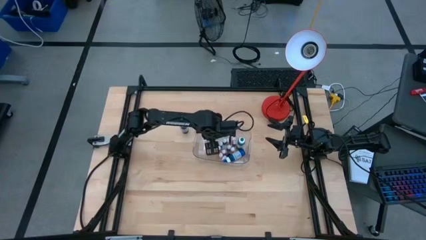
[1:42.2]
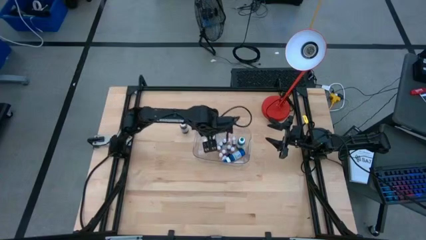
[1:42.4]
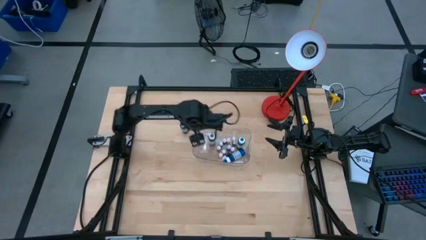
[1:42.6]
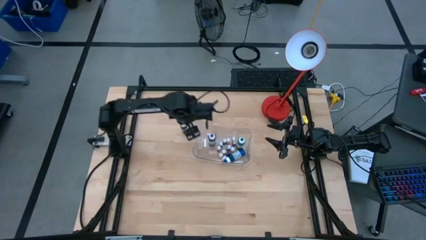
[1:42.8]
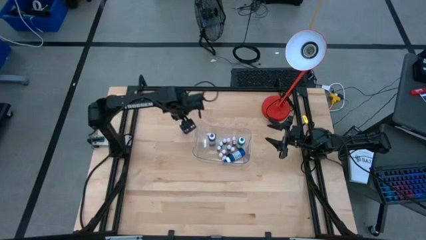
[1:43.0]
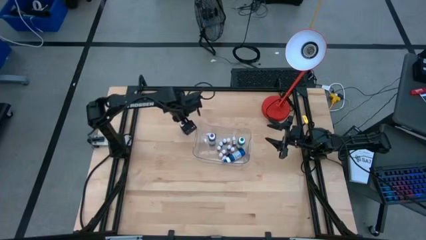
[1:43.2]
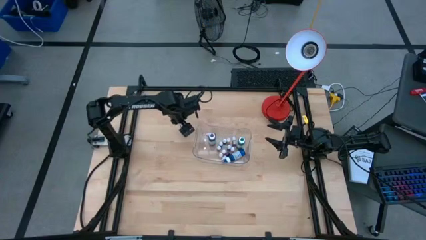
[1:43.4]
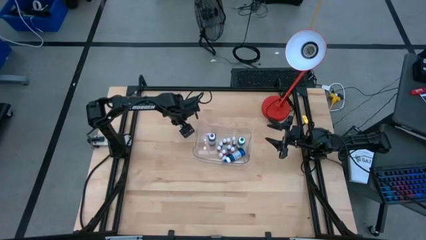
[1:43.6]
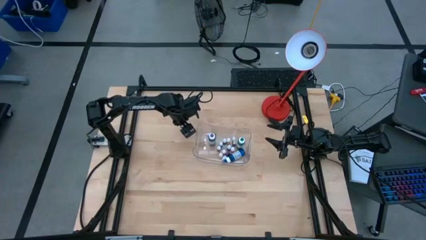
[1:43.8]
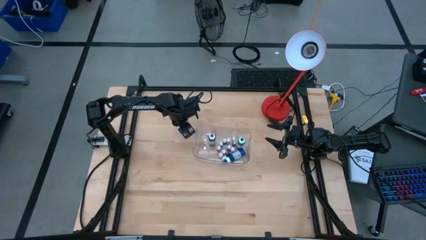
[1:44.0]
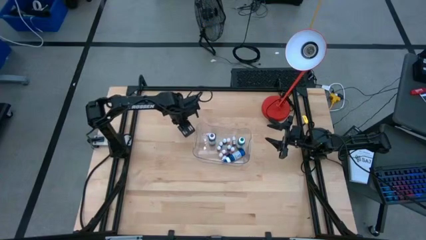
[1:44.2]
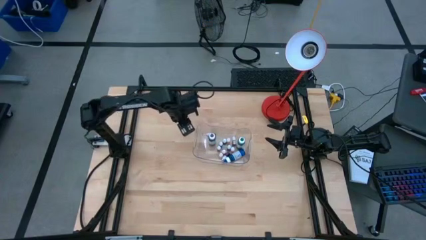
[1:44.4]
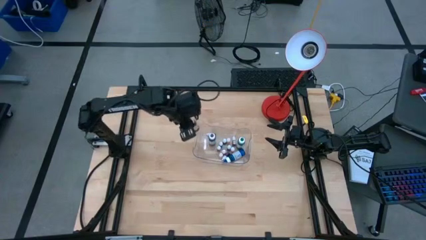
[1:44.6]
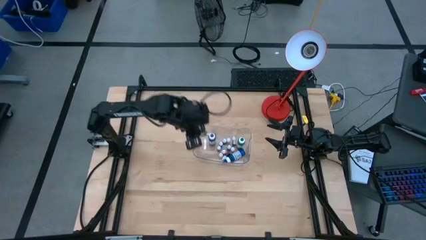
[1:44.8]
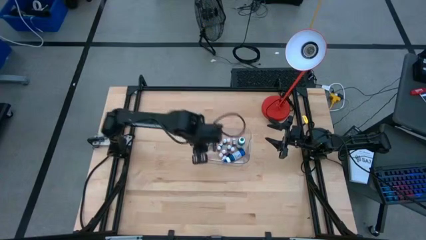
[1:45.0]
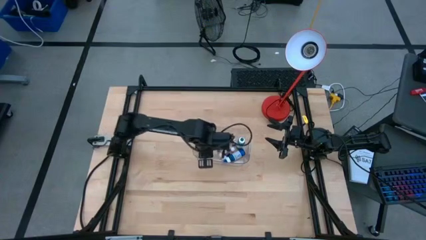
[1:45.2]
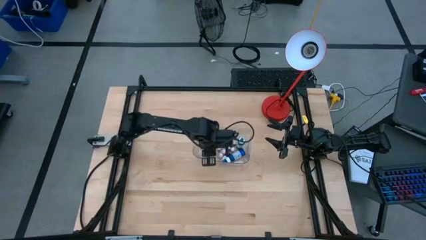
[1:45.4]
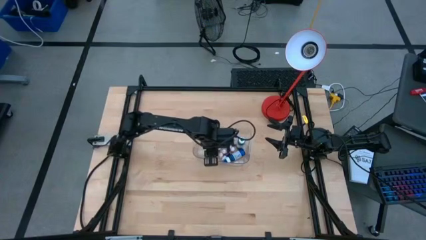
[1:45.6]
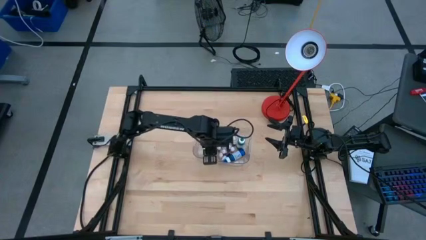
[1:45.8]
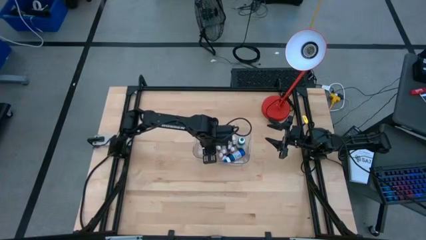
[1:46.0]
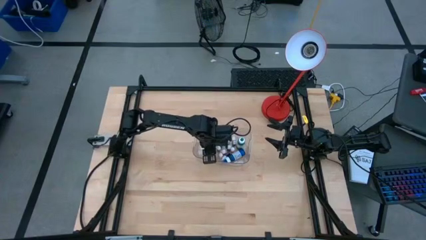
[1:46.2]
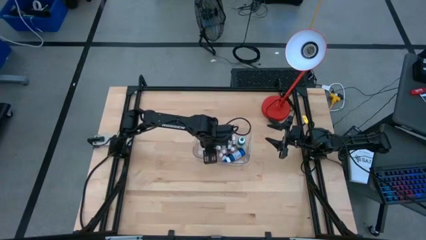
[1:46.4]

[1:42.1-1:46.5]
Task: Pick & Place food coloring
Put the large black food coloring bottle into the transparent bin

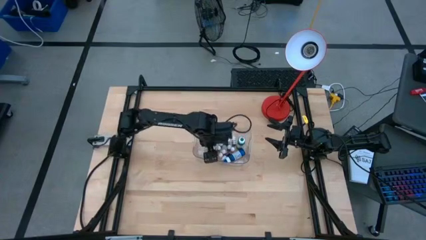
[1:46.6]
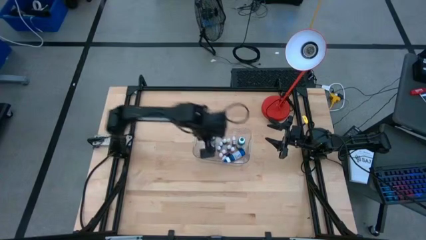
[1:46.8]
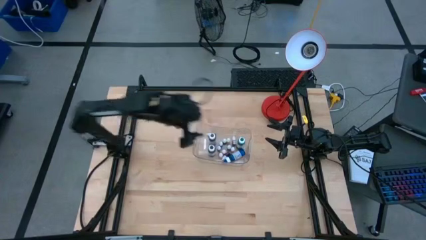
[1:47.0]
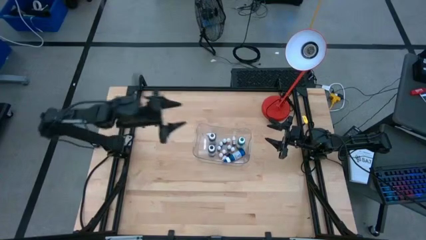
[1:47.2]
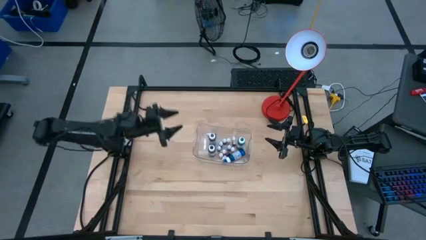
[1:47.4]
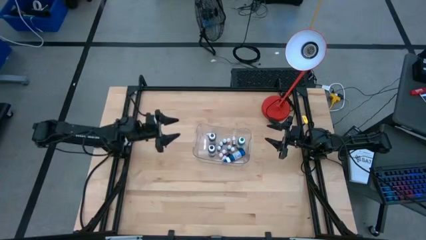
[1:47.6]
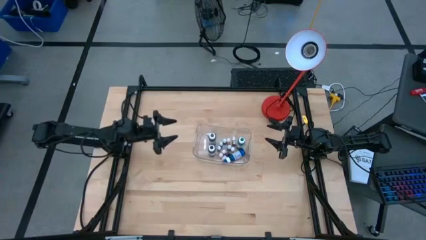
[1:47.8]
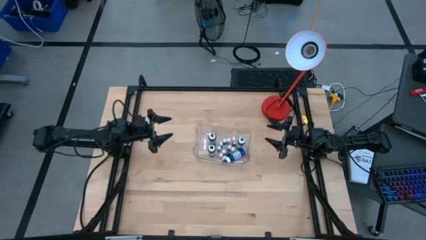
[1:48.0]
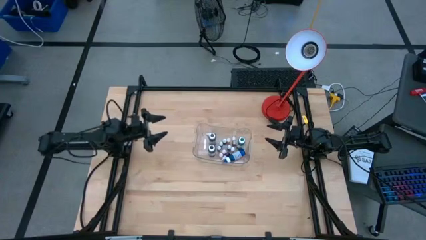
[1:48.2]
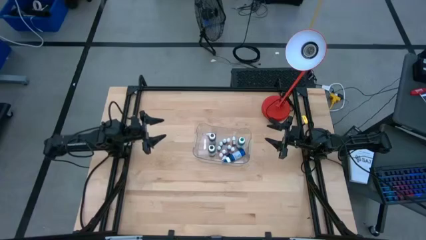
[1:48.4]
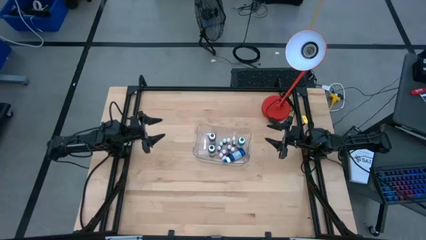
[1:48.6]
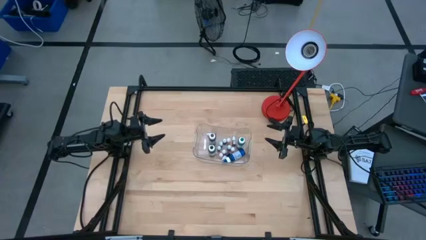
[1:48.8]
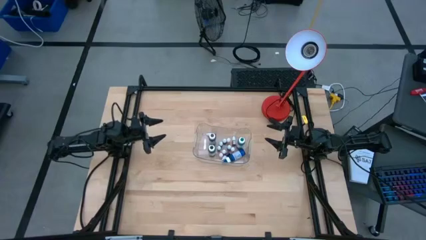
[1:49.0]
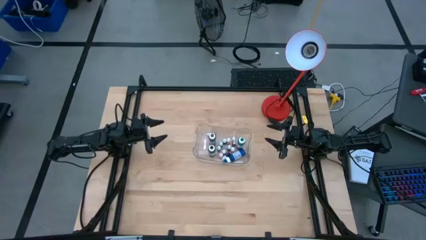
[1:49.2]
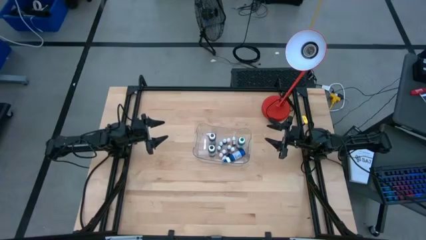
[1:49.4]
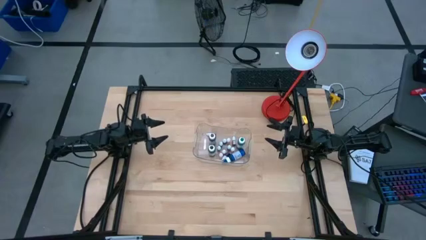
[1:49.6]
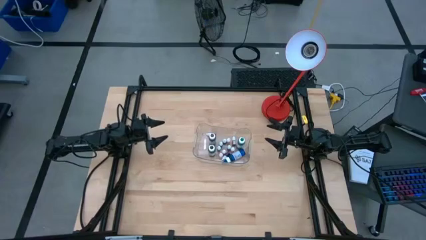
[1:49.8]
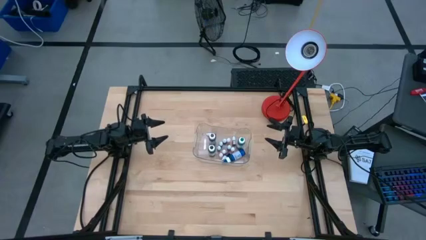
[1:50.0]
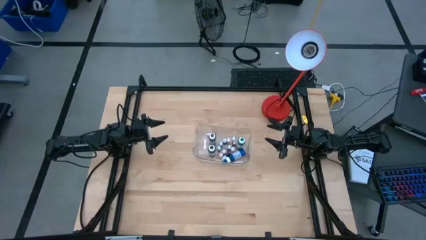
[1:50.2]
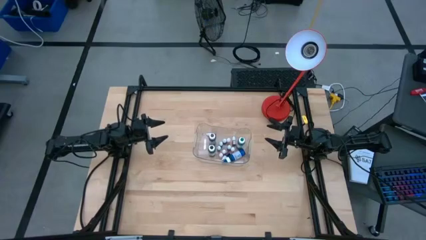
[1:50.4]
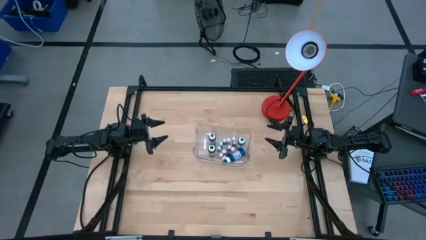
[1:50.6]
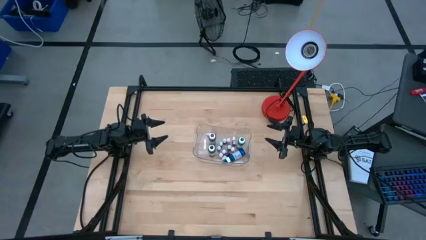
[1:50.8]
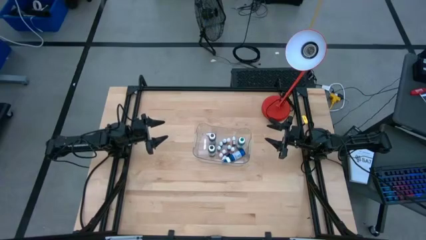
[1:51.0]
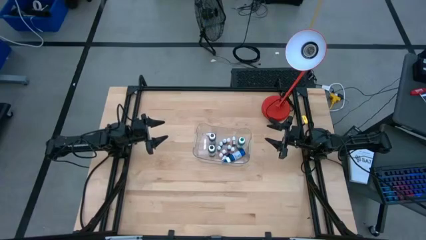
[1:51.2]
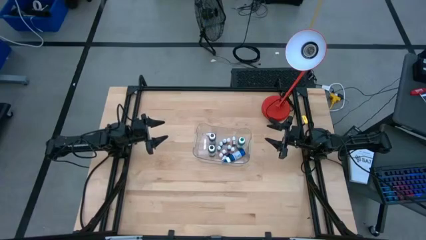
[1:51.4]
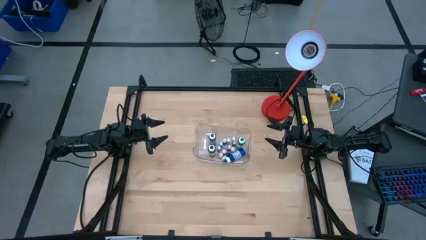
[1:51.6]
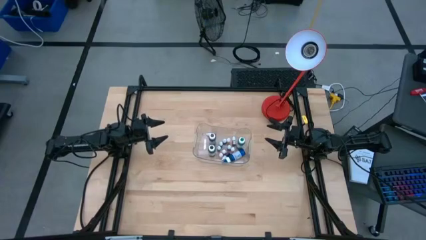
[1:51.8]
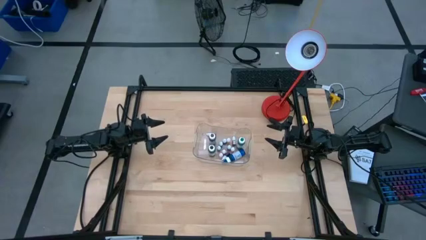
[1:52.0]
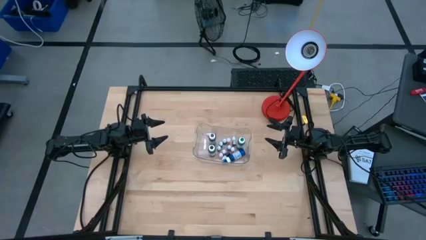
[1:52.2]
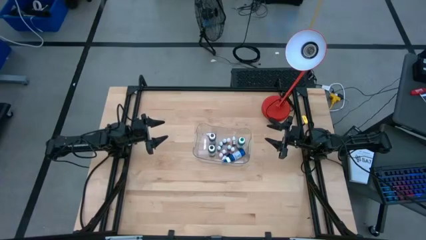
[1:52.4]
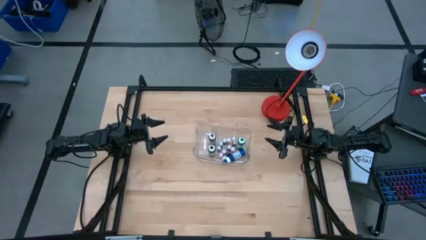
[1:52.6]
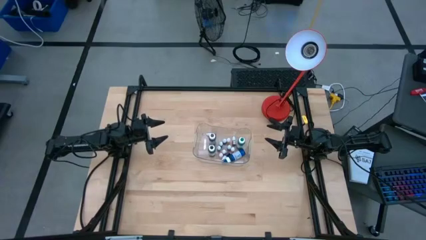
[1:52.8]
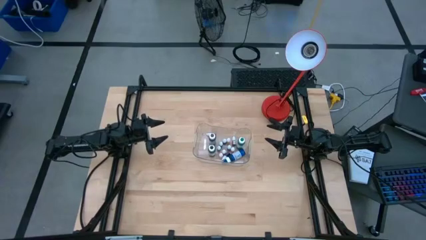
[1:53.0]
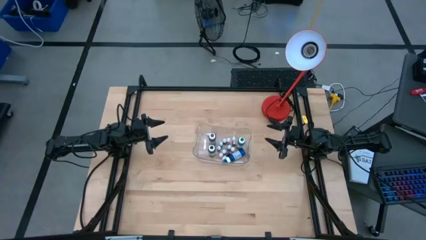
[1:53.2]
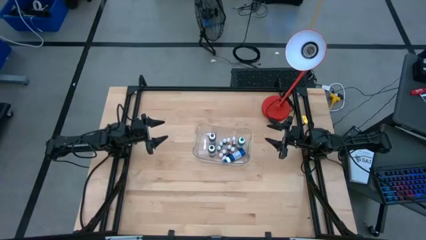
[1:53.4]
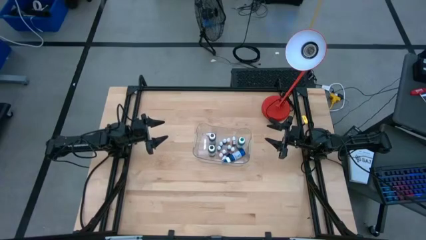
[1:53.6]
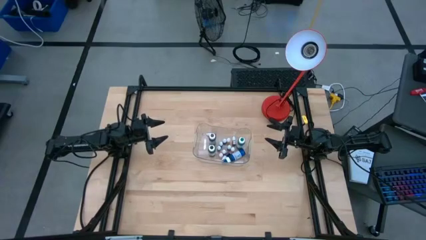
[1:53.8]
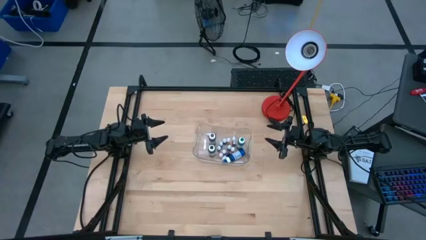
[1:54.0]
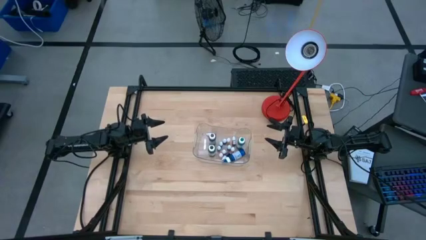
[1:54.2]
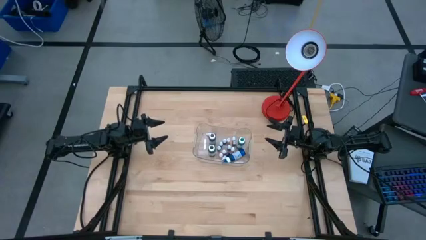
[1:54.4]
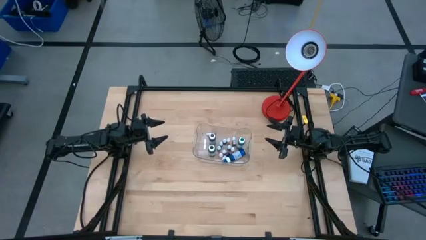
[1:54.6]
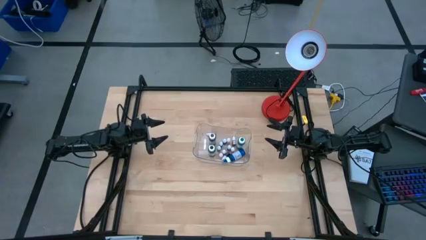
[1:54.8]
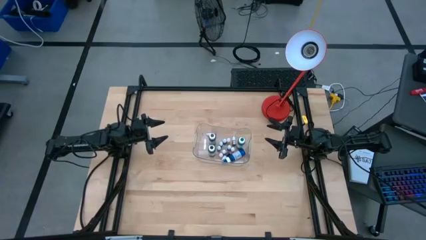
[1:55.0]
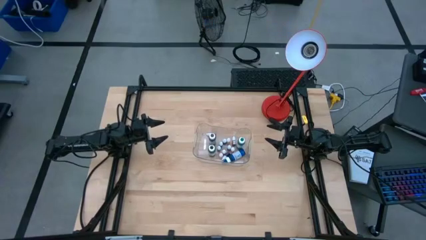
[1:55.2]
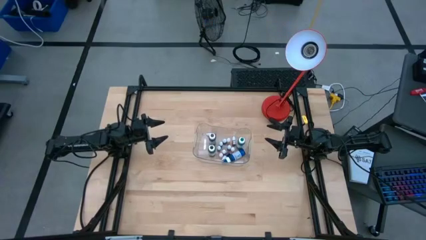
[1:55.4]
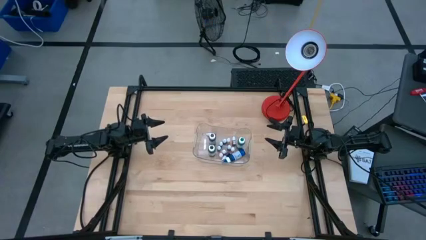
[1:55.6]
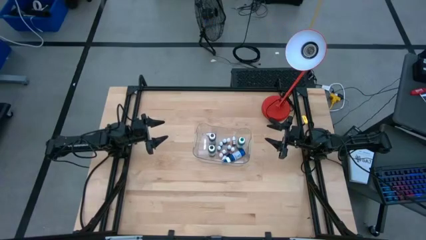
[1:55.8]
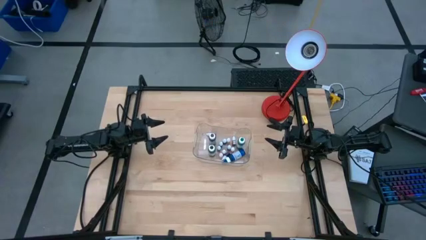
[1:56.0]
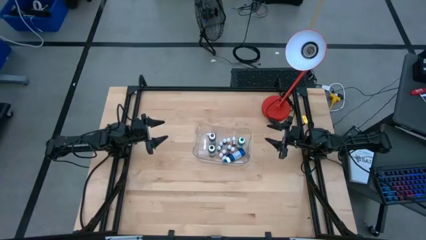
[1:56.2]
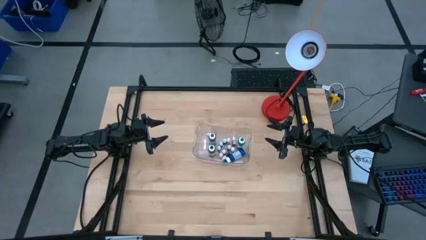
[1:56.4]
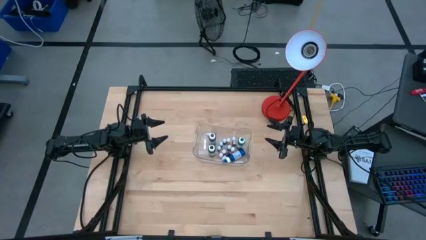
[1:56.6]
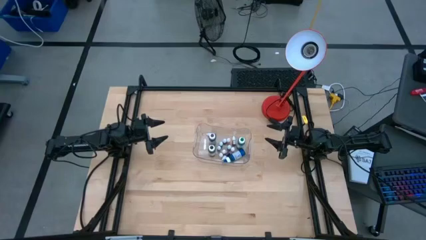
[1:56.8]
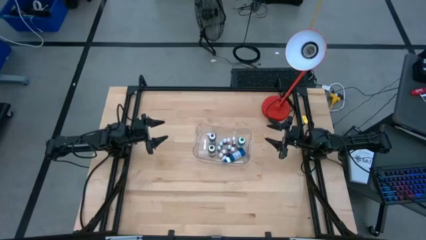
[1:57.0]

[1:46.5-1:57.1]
Return to Home Position

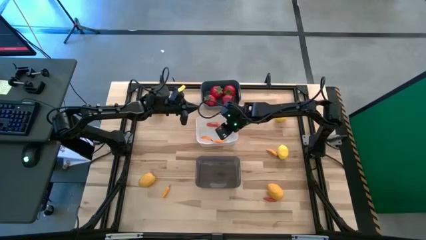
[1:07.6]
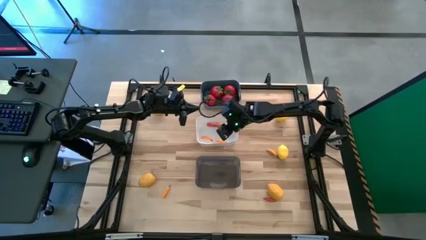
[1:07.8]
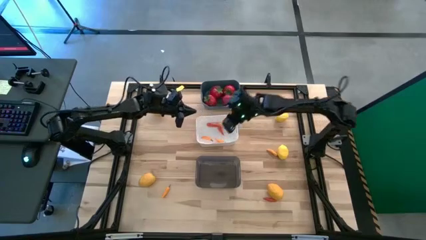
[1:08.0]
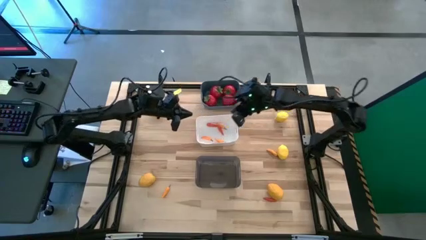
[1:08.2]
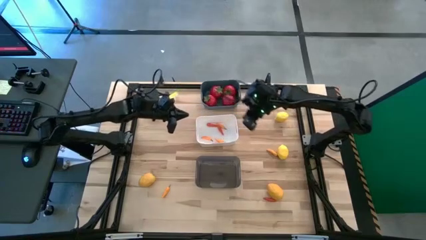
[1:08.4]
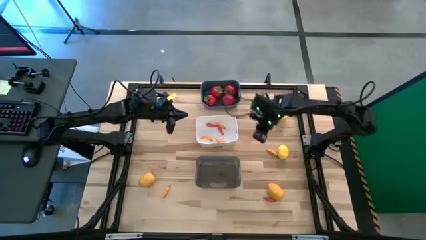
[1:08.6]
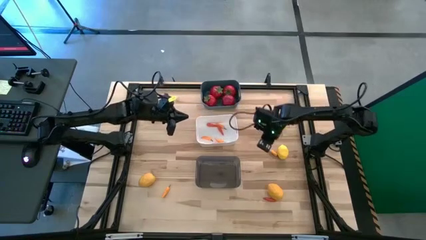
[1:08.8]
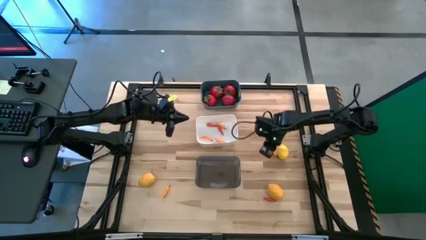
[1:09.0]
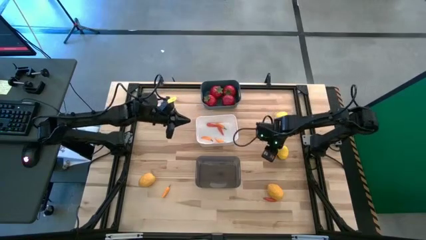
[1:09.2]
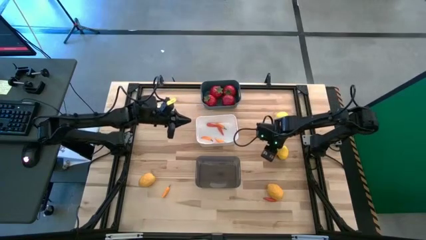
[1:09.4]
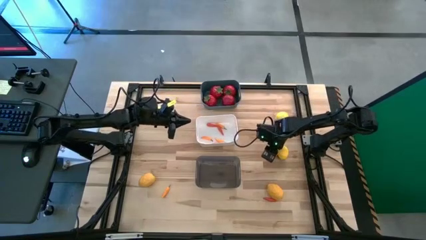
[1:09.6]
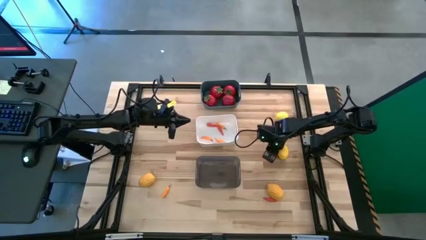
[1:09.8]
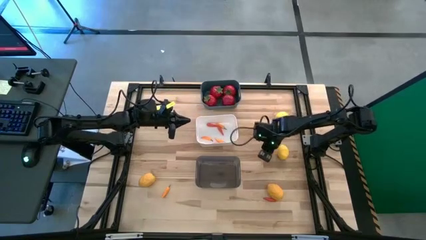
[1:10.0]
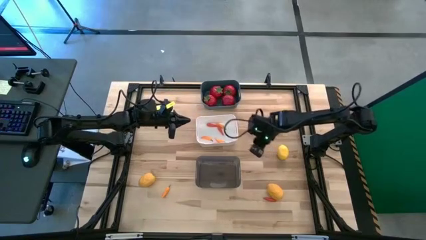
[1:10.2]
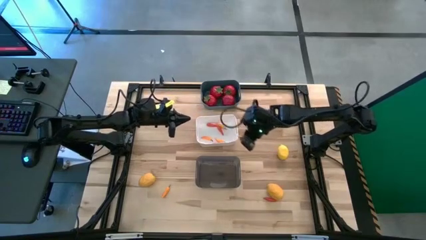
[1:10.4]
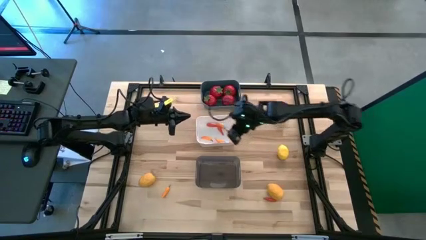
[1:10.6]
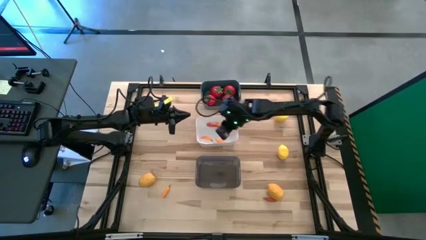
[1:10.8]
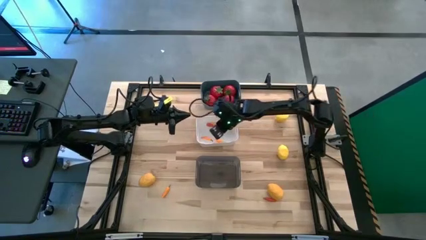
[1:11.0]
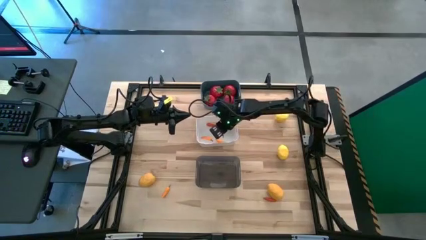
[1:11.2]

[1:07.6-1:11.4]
Task: Sort produce into baskets
Put the orange chili pepper into the white bin
